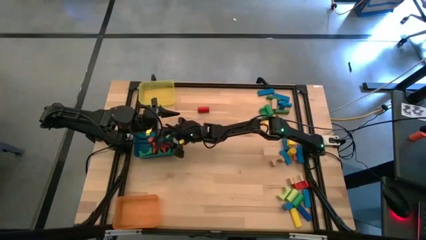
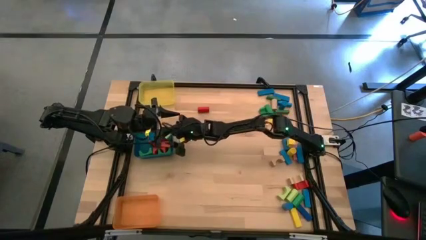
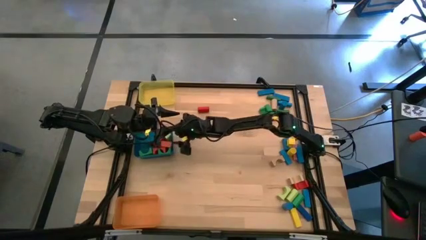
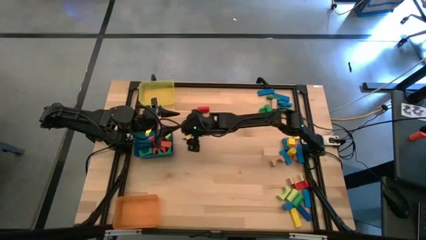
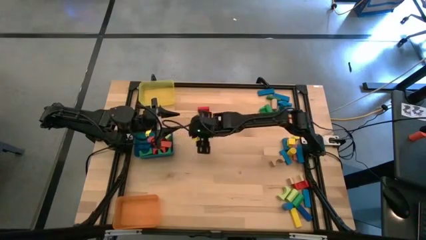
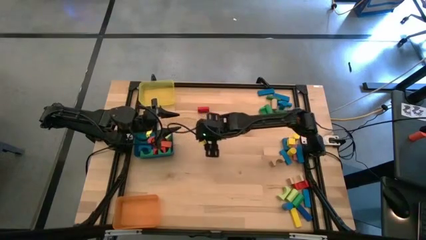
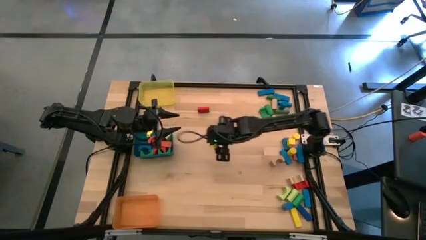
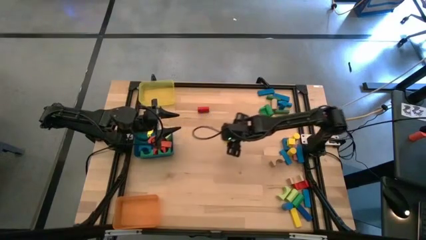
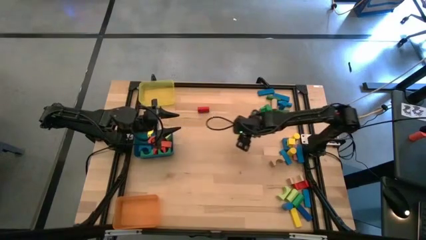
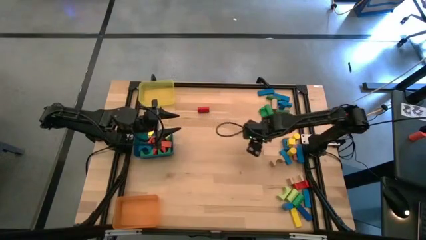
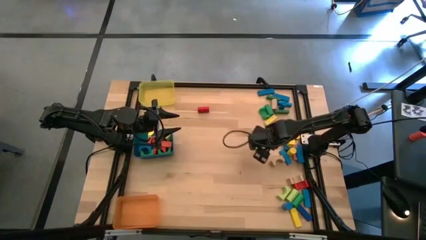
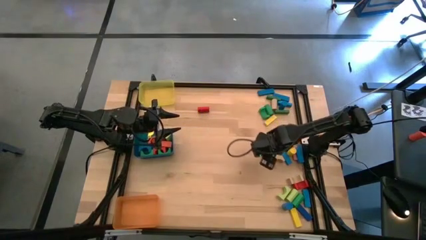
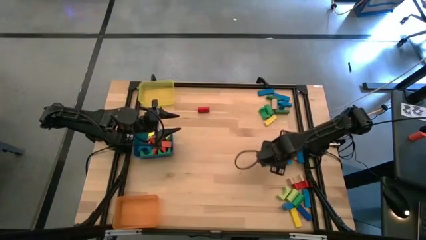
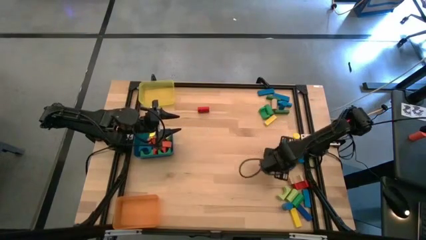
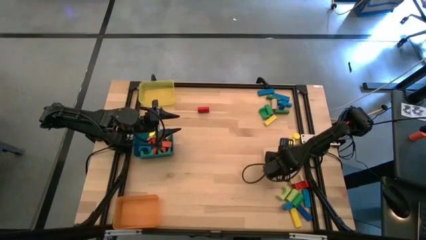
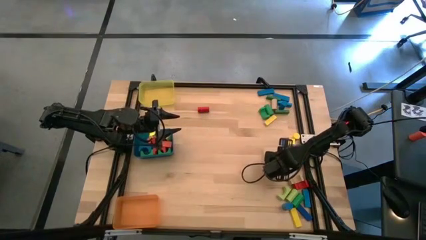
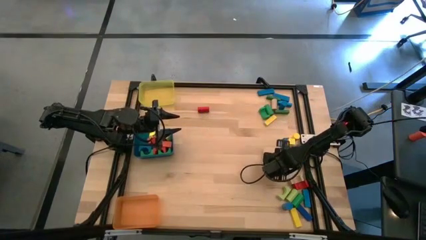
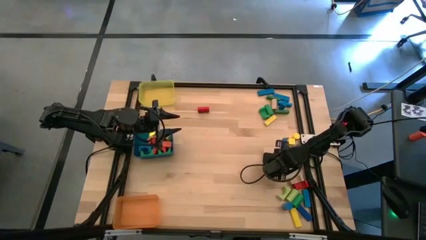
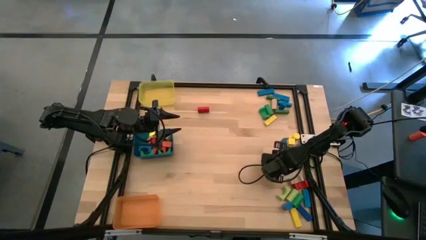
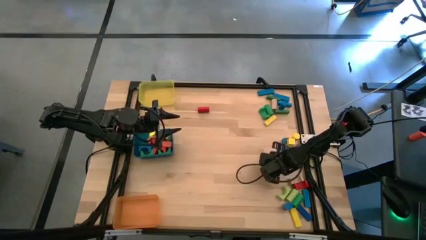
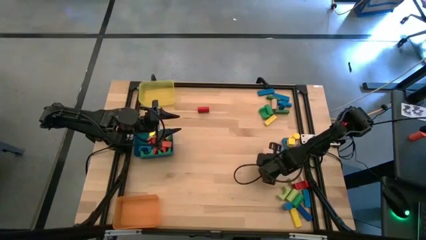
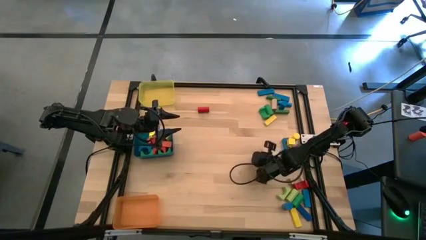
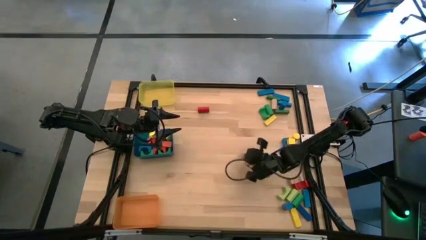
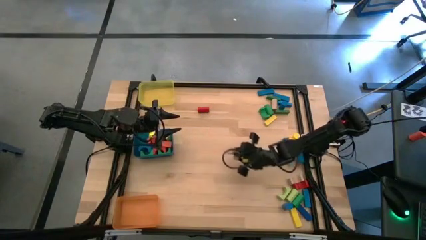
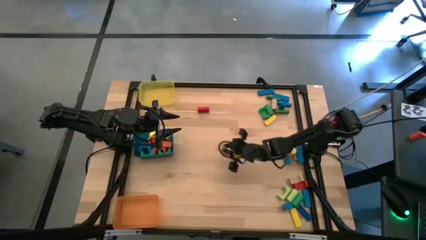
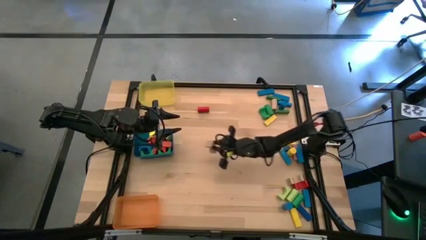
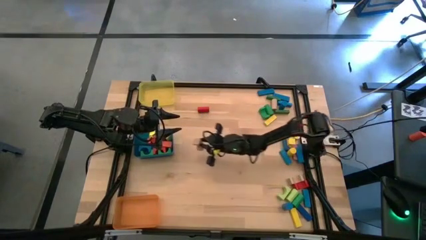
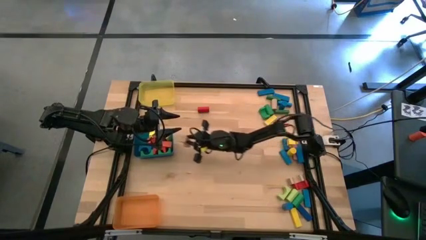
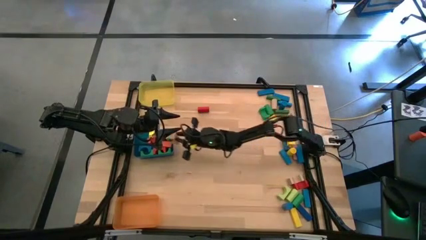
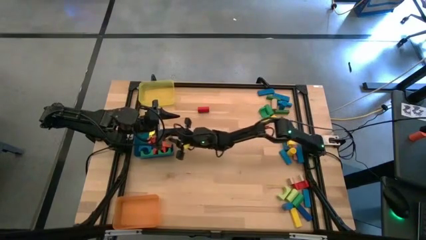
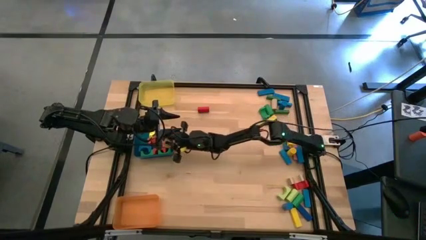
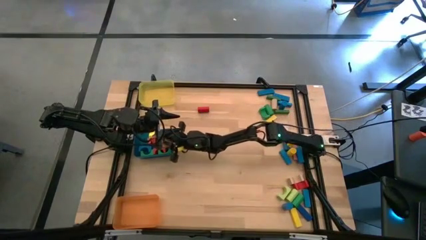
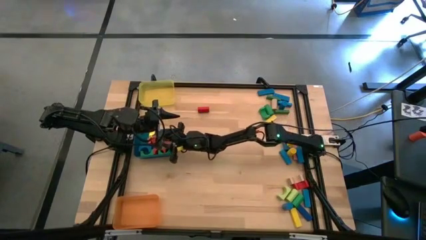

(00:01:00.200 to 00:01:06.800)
Task: Sort blocks by size
Put the brown arch block into the blue bin

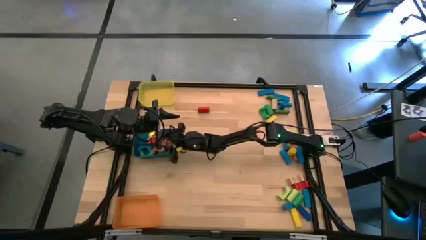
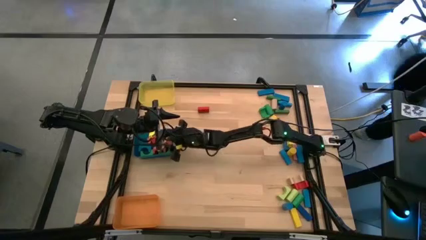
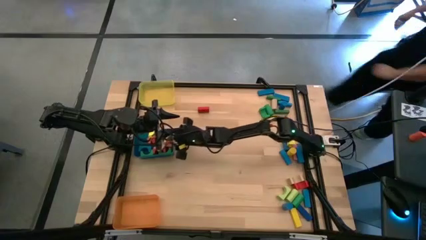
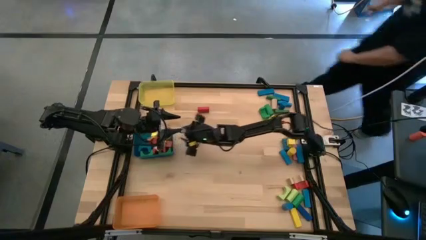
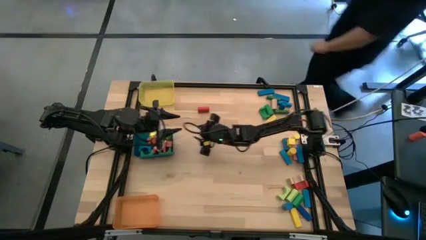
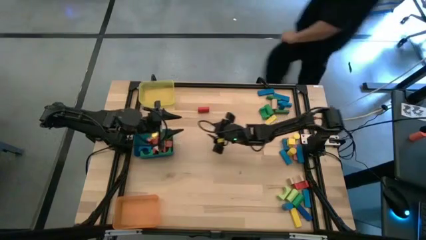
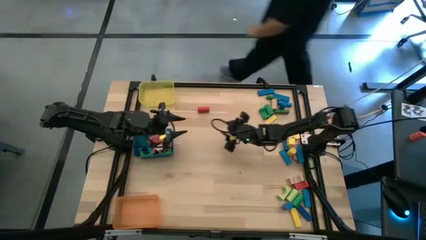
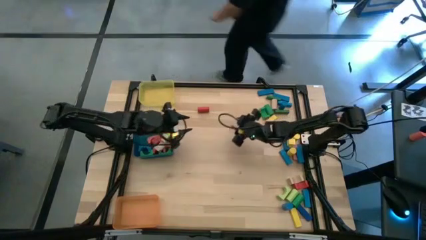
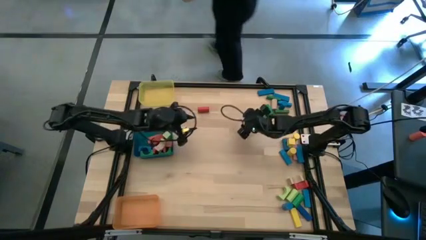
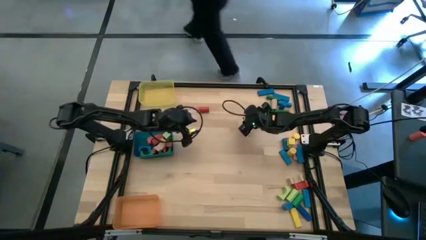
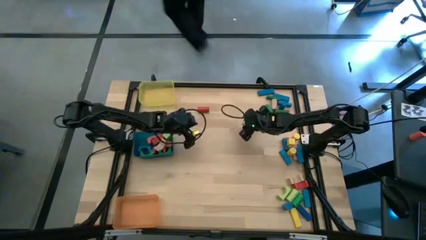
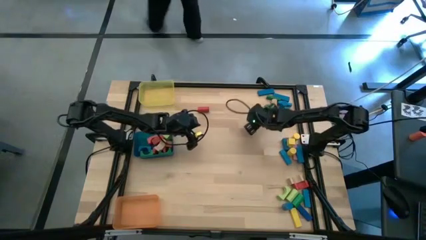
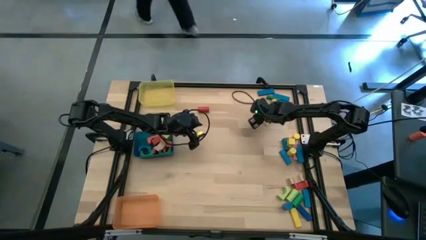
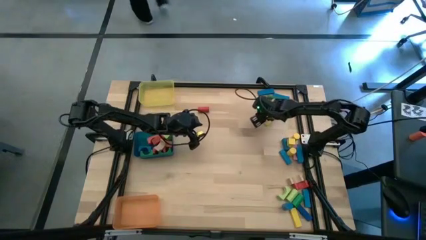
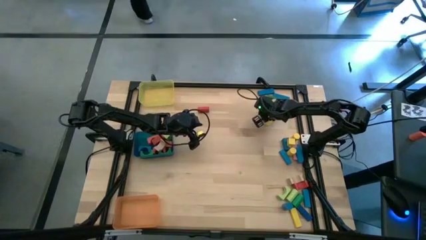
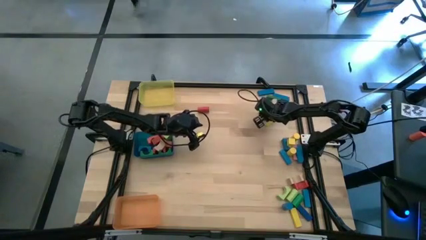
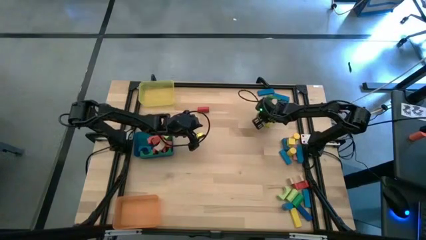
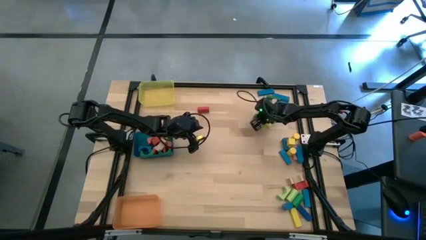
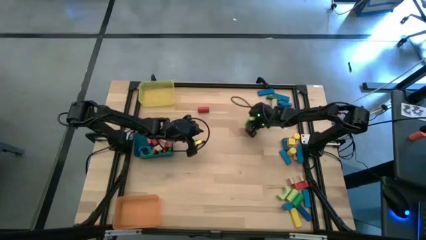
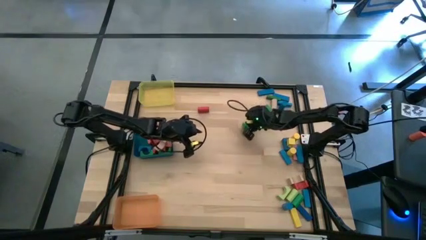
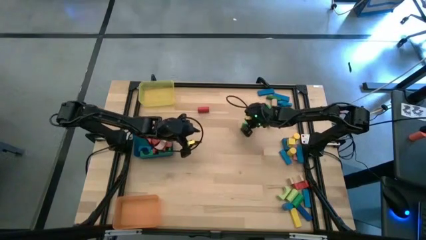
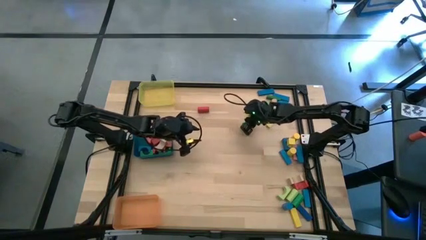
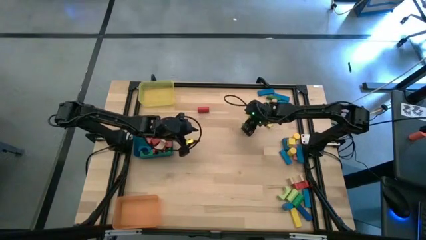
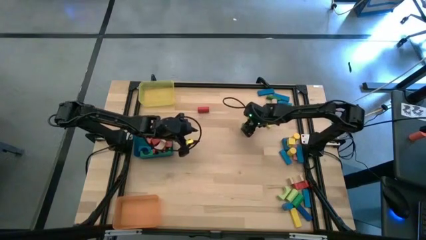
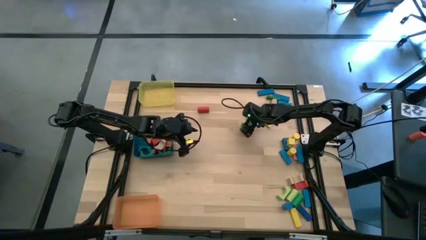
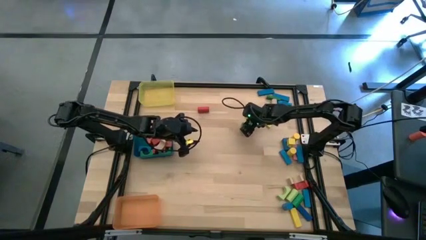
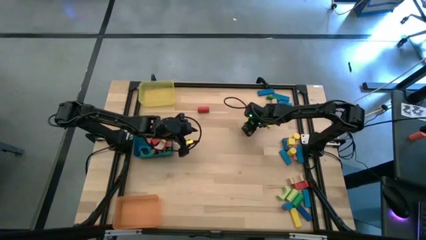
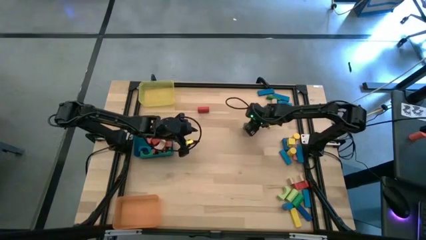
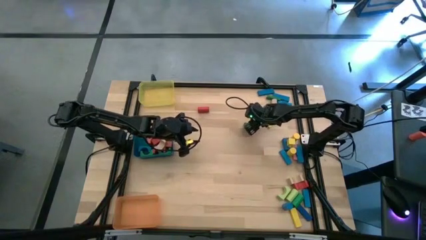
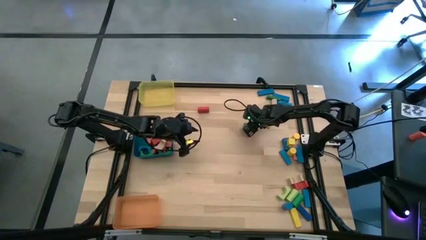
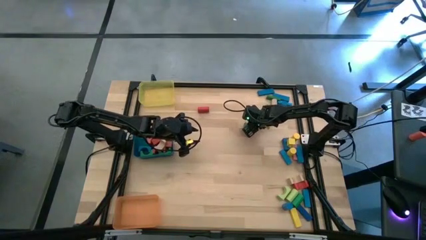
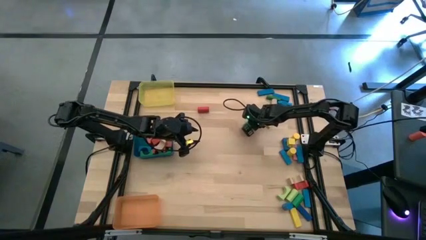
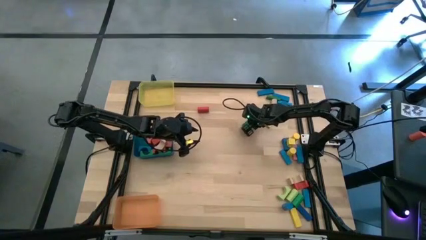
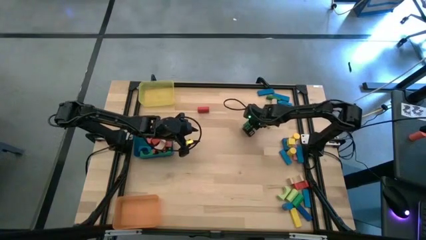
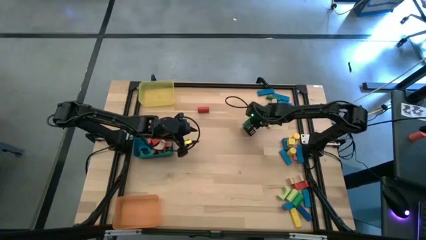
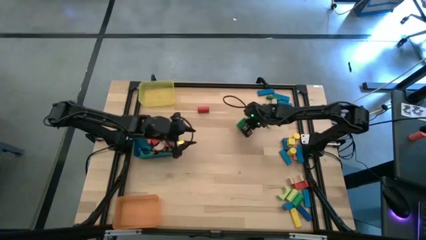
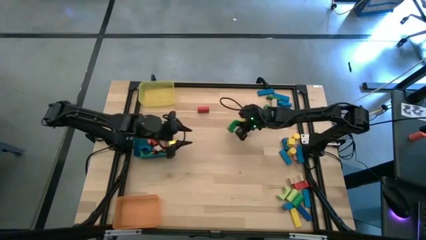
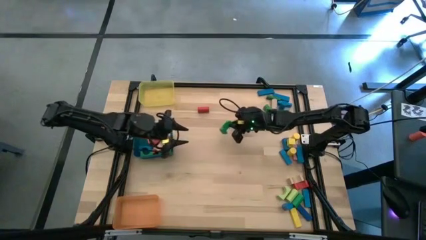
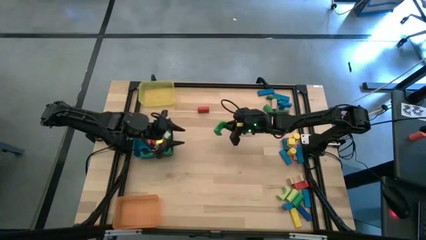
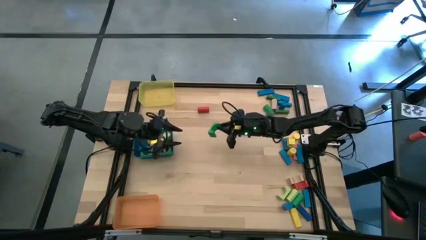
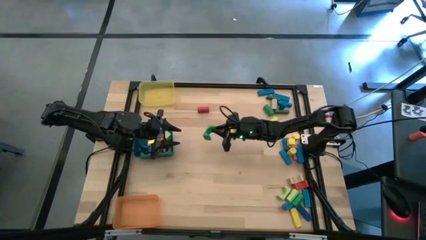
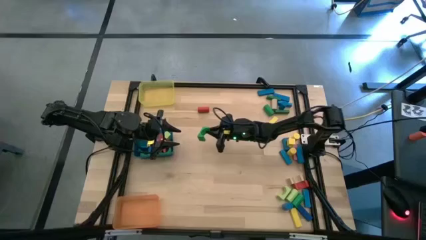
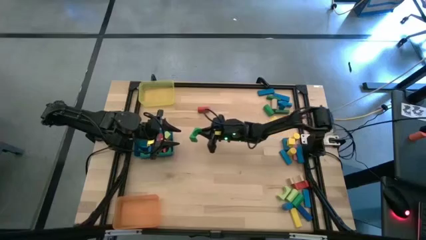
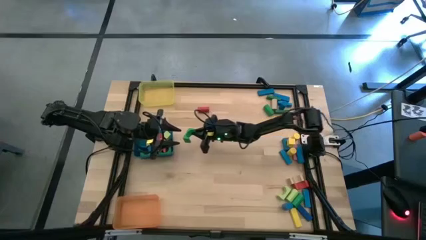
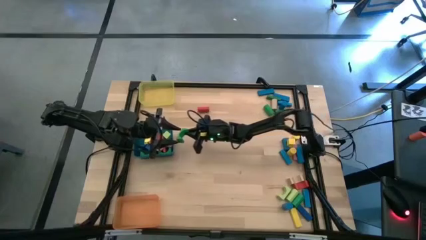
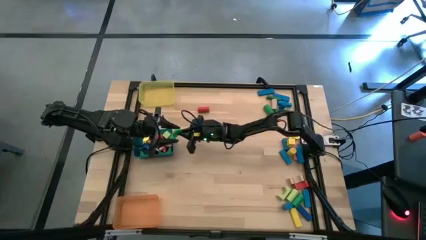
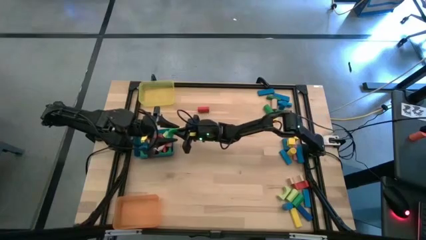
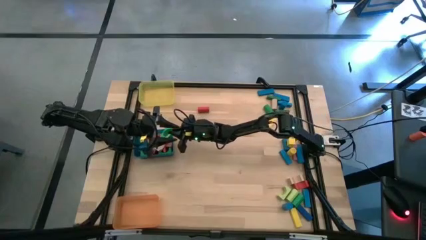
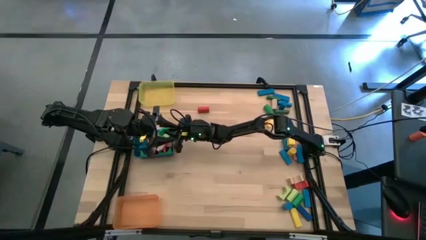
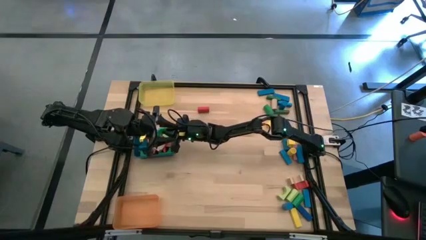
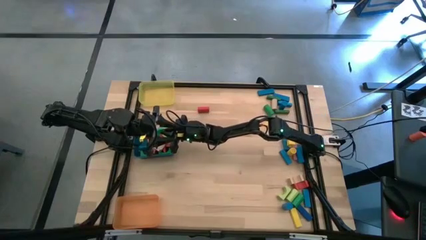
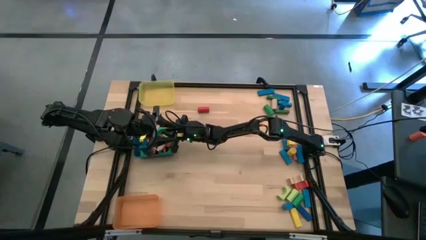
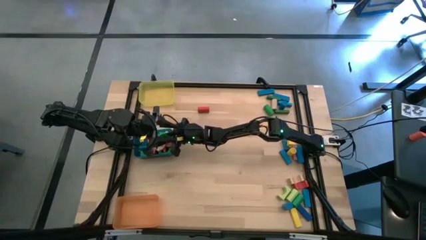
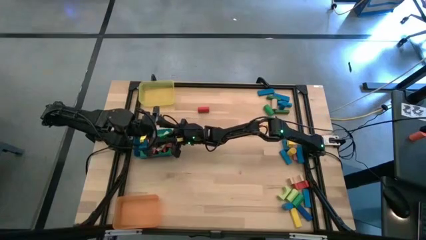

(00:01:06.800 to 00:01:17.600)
Put the green arch block into the blue bin
